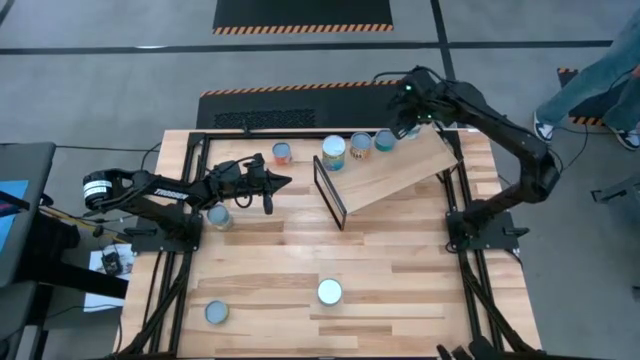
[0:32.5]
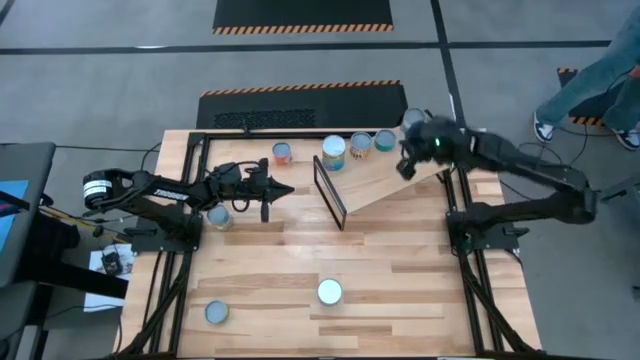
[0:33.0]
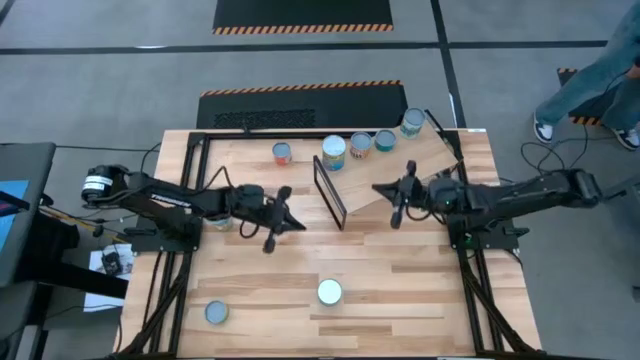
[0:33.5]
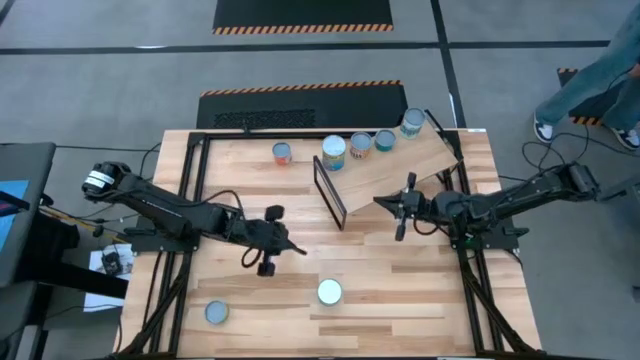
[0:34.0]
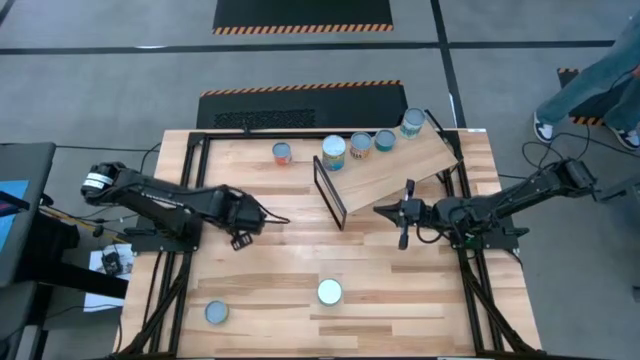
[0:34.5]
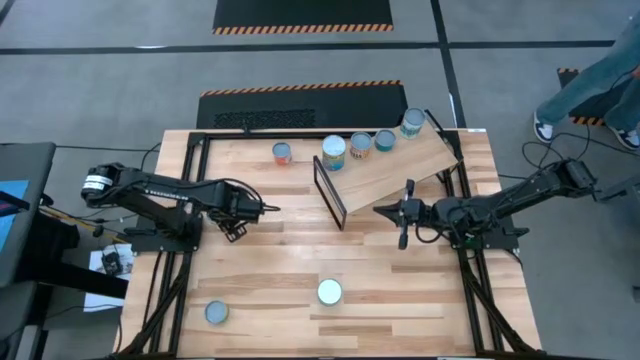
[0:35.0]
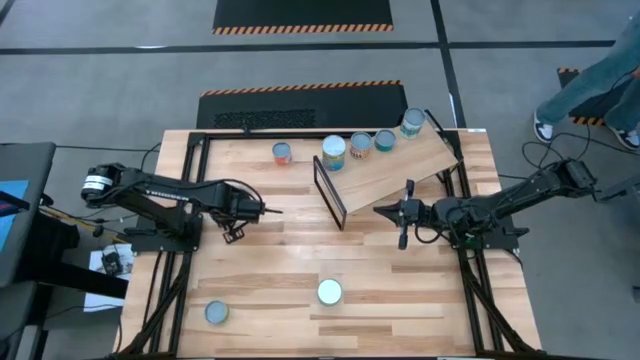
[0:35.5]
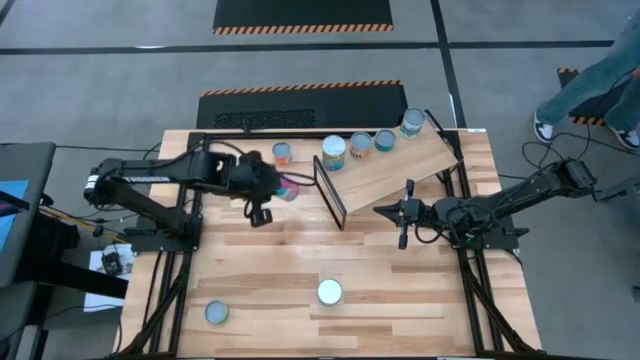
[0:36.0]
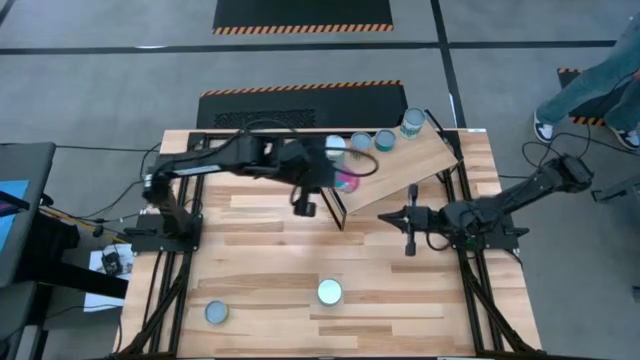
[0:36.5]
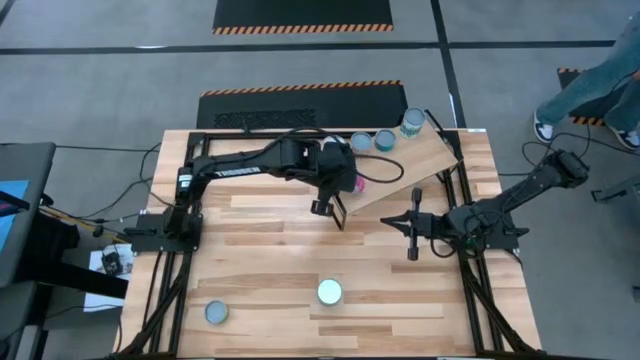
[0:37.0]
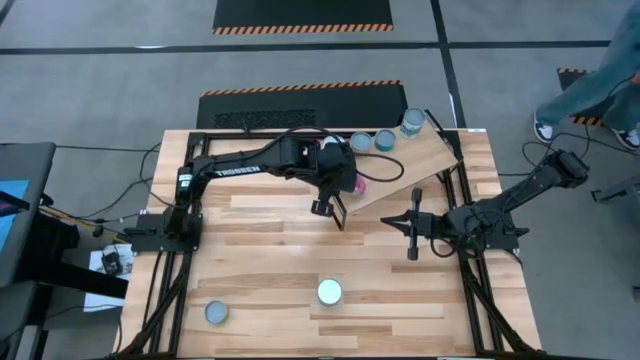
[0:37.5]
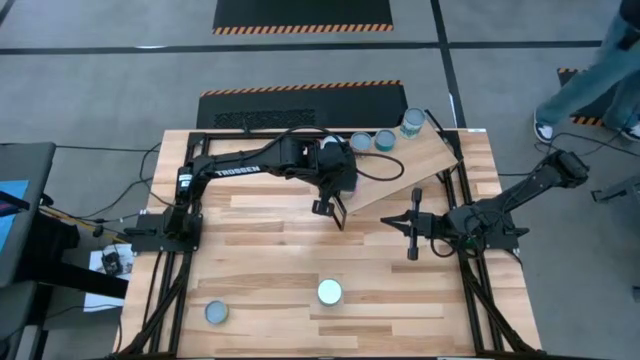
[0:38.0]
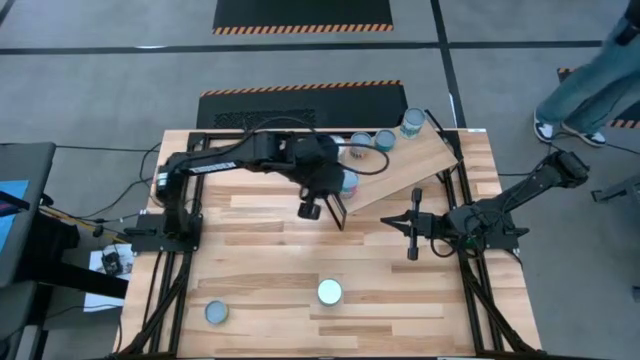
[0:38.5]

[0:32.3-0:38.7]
Task: Pick and place cans onto a shelf
Put the can of chicken soup on the shelf

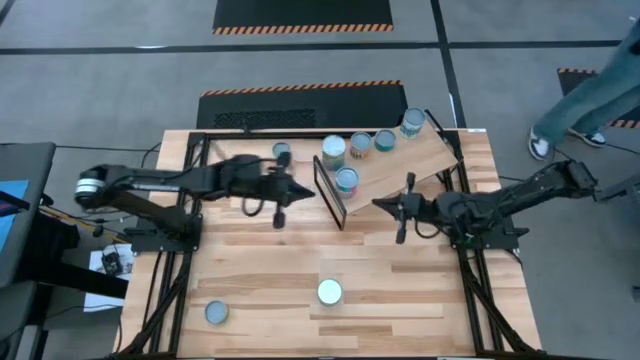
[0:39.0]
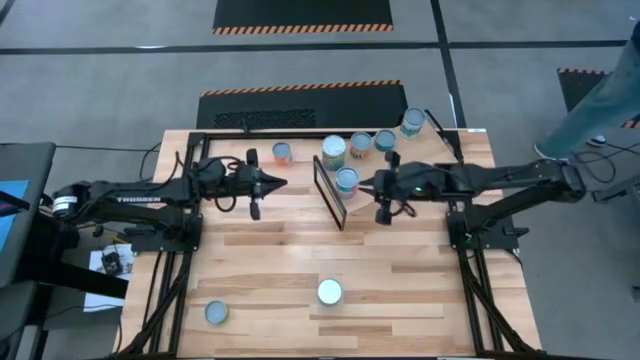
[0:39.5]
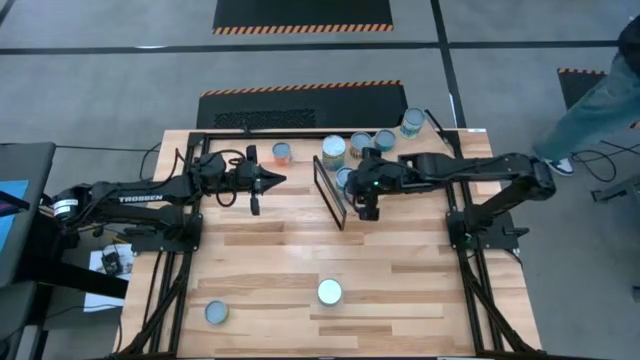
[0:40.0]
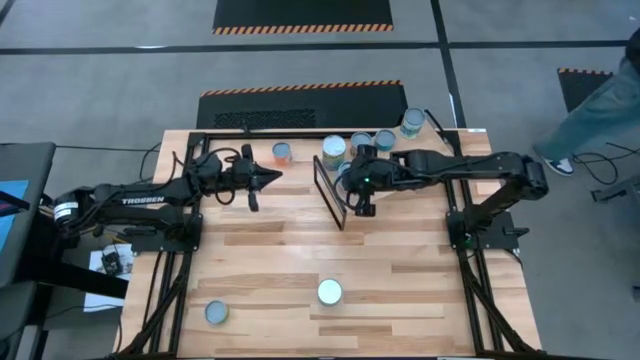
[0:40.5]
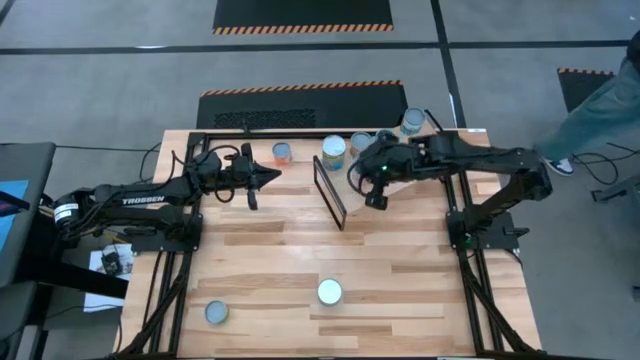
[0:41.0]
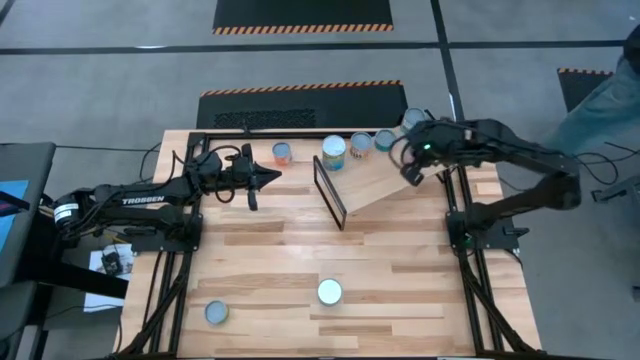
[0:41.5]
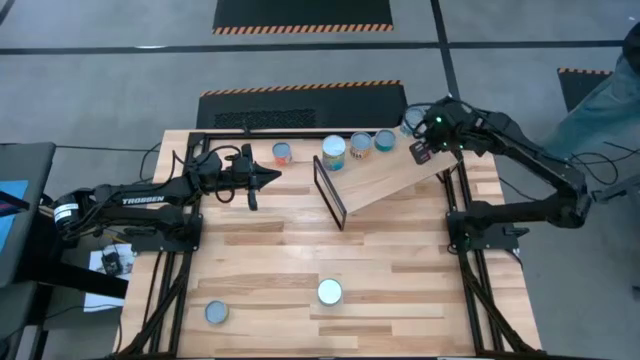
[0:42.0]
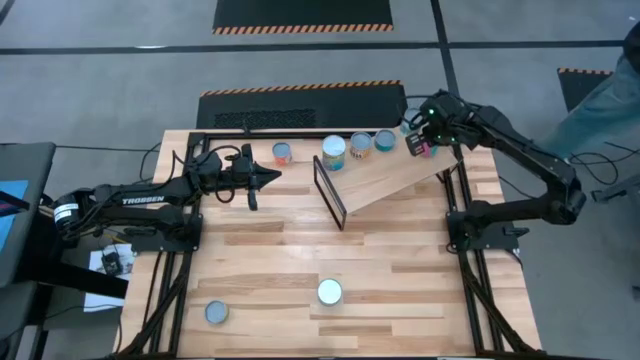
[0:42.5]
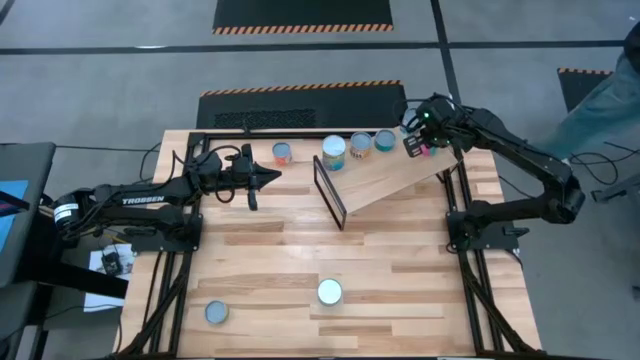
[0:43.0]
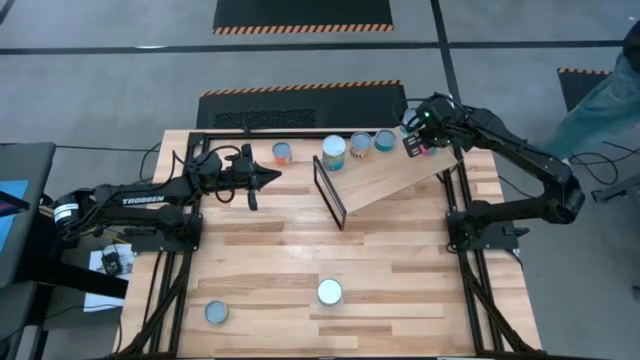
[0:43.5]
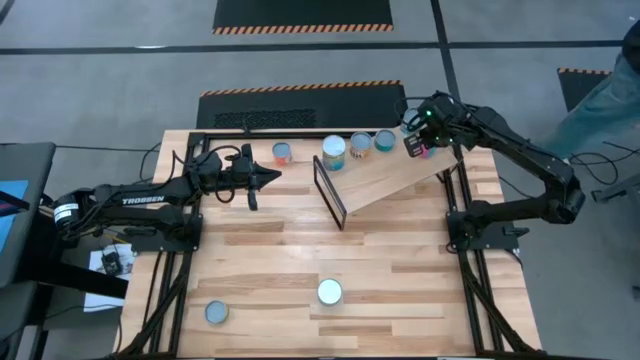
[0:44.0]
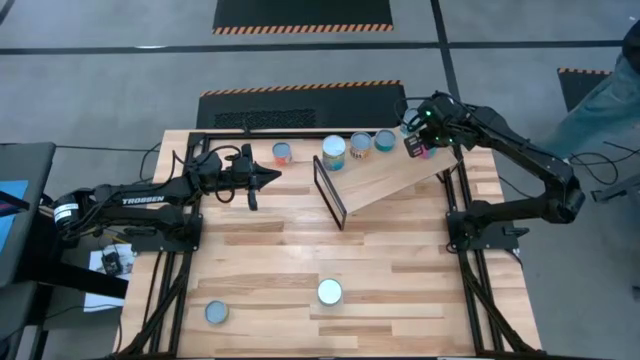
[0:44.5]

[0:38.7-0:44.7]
Adjust the can of chicken soup on the shelf

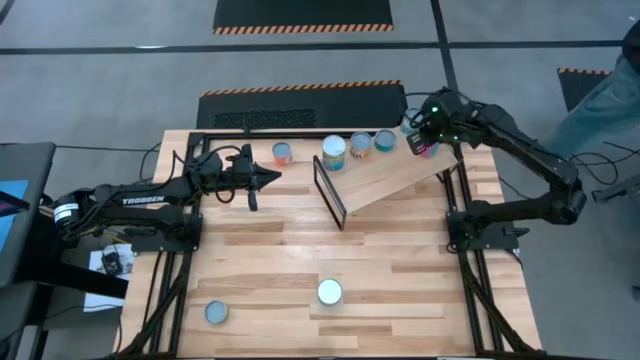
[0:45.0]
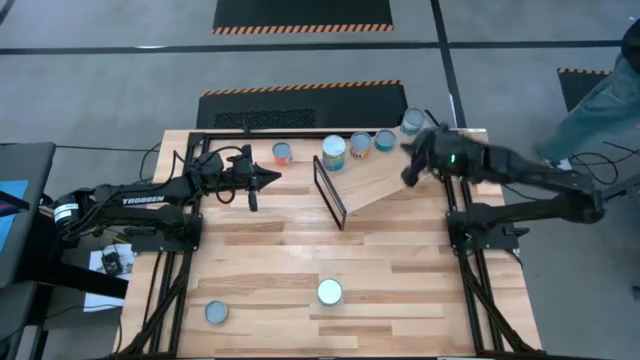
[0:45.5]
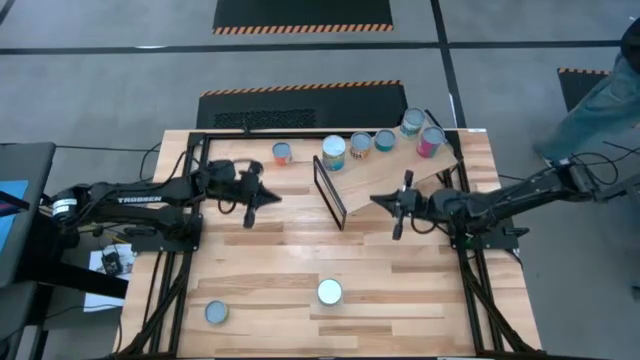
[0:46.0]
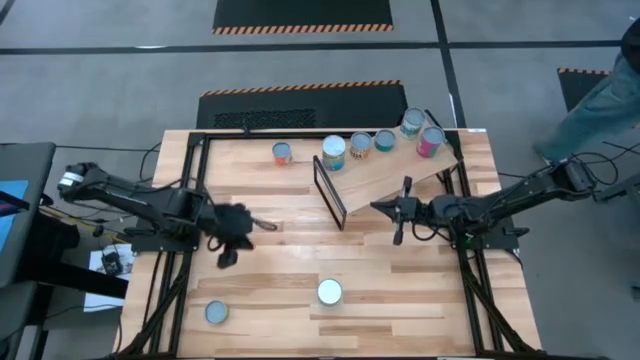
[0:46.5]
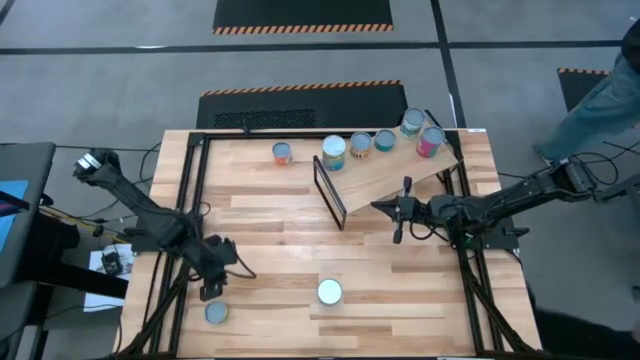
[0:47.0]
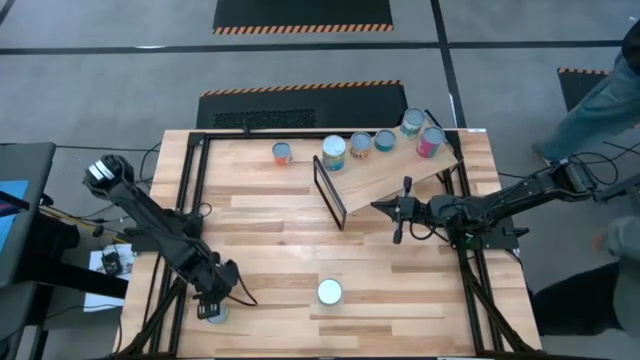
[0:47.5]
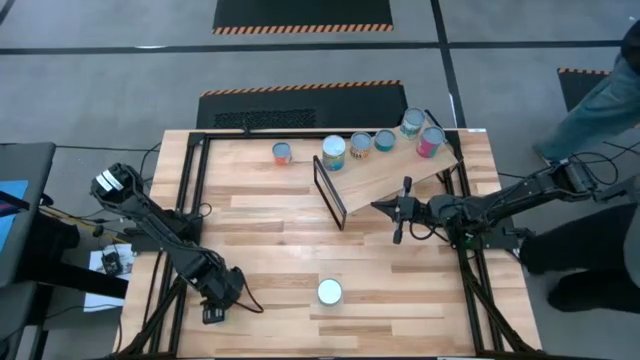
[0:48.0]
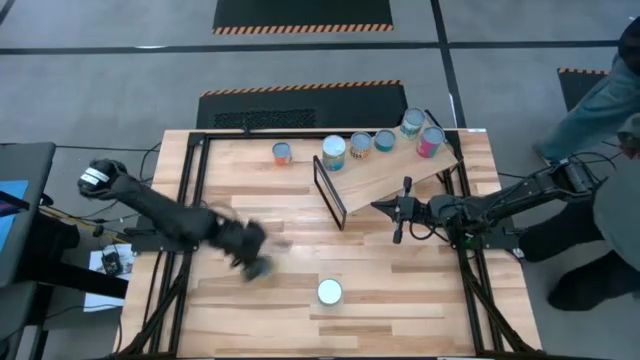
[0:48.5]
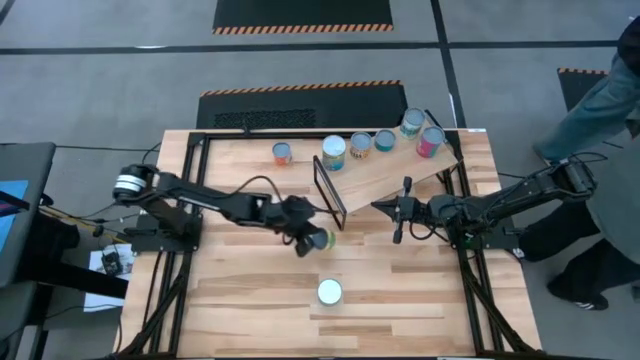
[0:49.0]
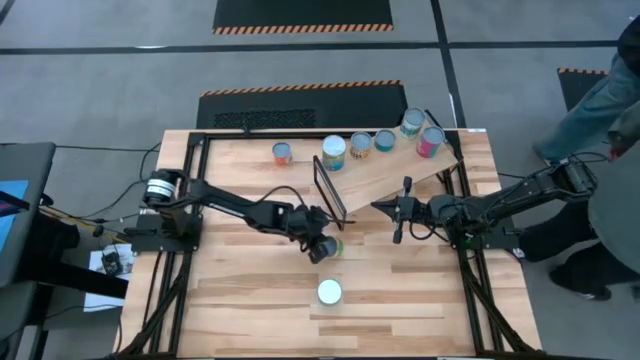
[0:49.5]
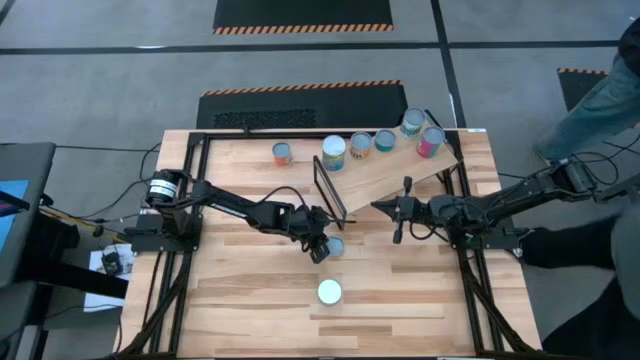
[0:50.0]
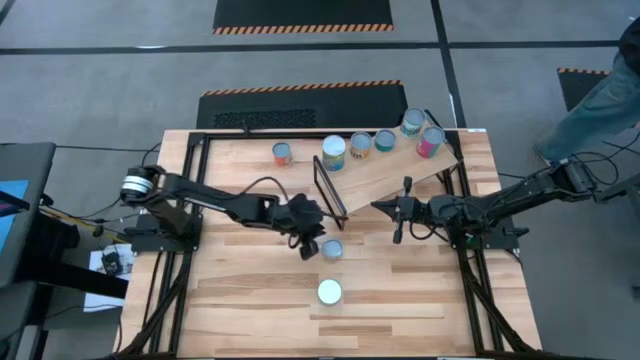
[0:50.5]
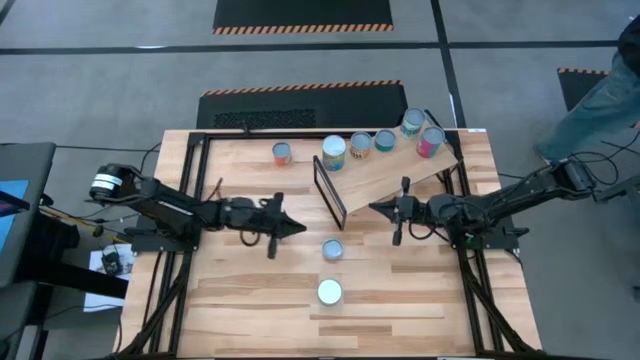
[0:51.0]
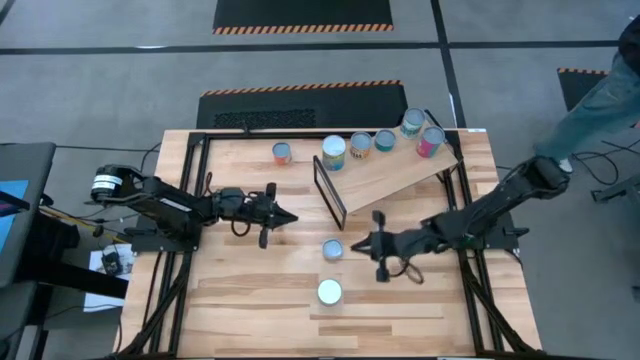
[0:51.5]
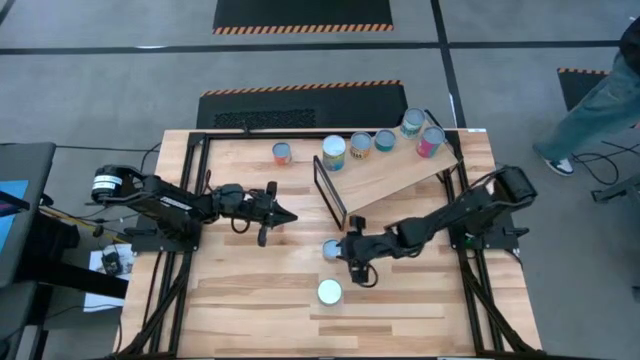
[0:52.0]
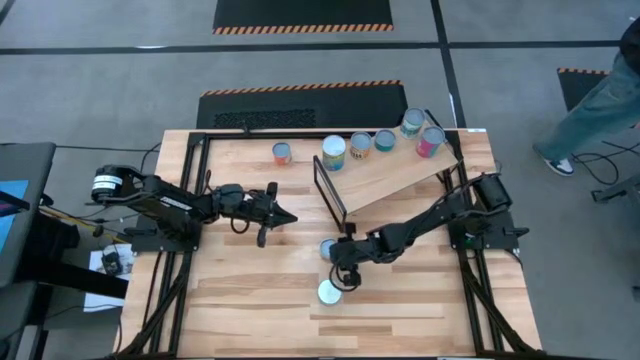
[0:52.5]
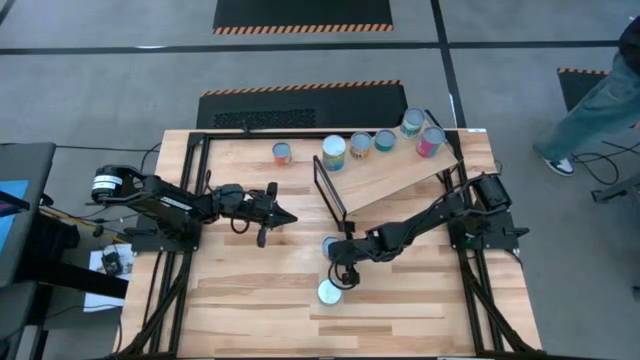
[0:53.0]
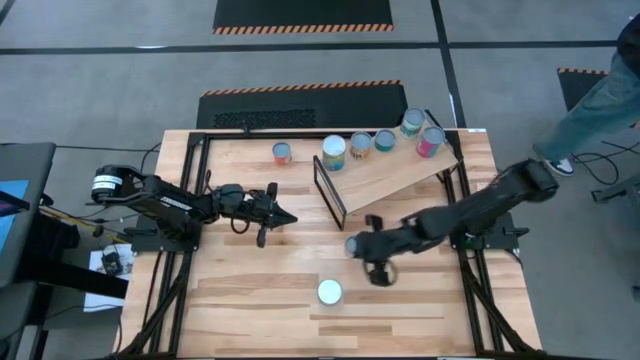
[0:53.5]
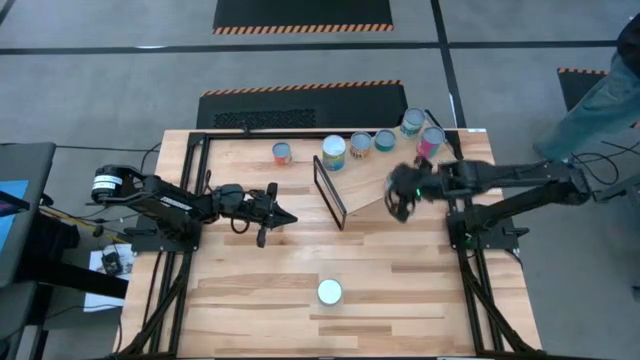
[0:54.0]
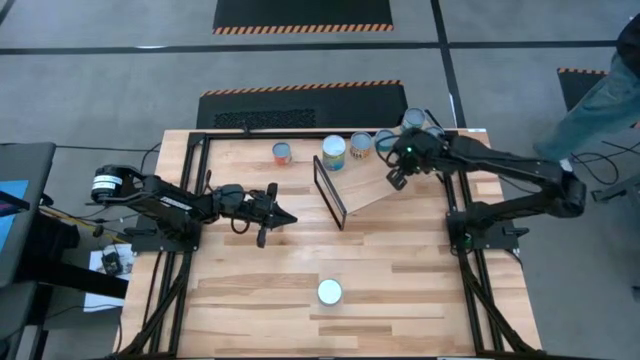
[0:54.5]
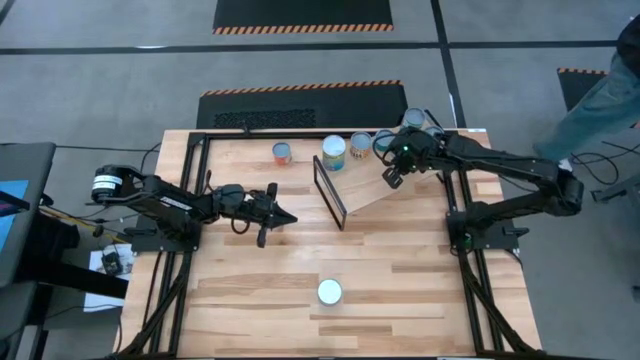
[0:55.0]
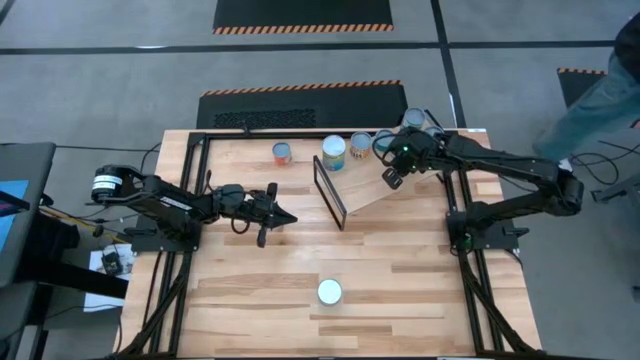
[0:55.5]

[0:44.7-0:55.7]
Put the can of mushrooms on the shelf
